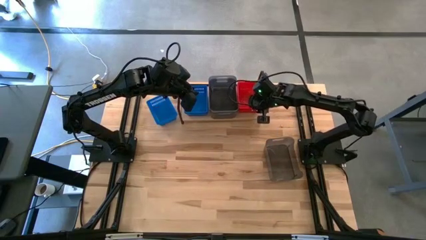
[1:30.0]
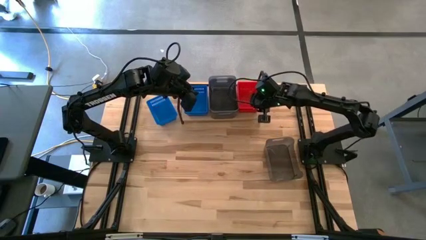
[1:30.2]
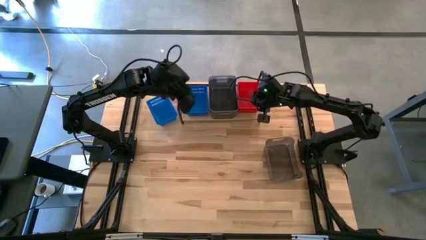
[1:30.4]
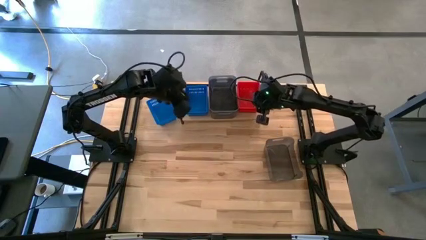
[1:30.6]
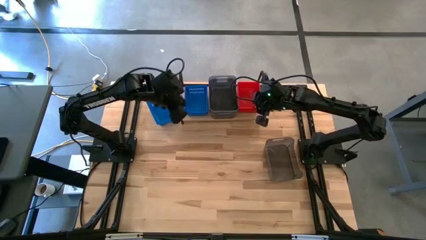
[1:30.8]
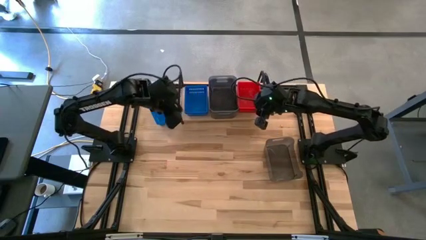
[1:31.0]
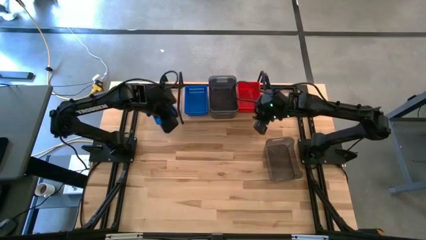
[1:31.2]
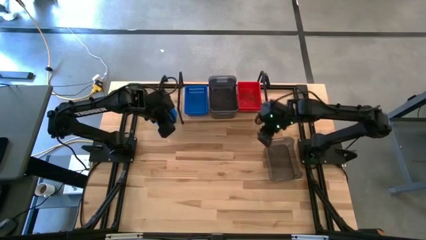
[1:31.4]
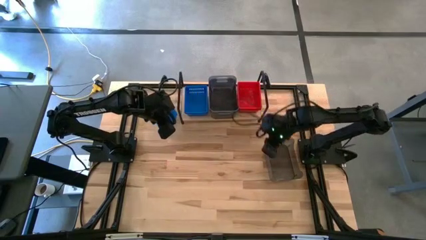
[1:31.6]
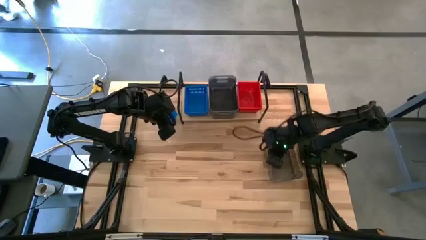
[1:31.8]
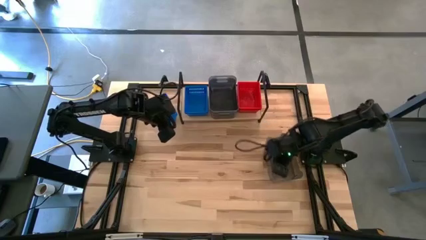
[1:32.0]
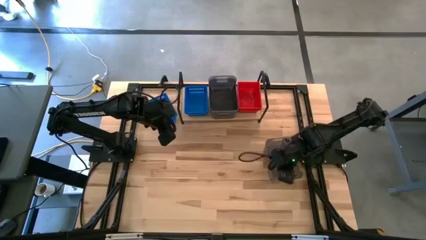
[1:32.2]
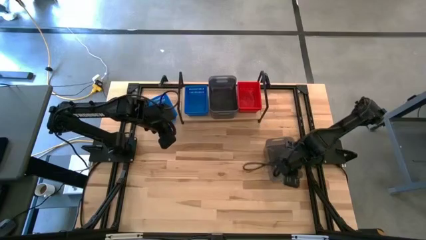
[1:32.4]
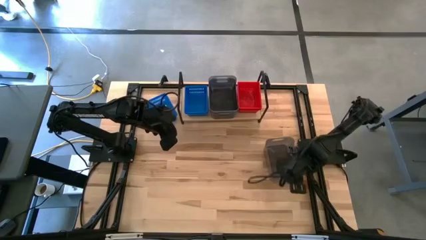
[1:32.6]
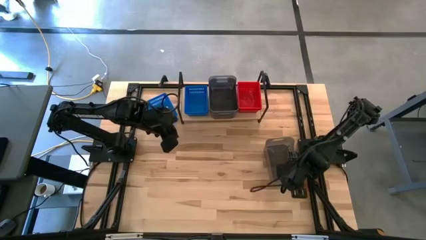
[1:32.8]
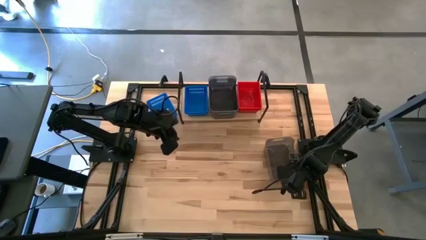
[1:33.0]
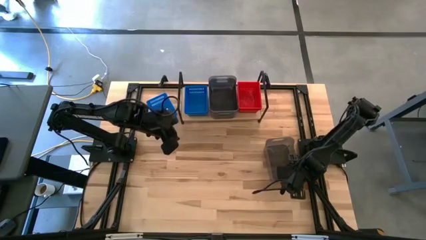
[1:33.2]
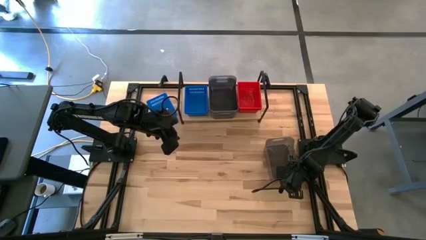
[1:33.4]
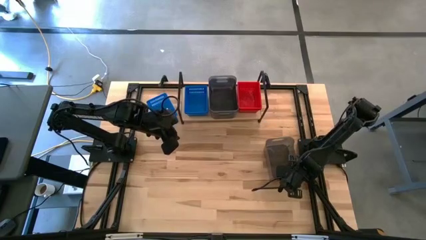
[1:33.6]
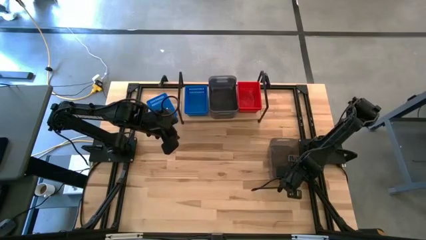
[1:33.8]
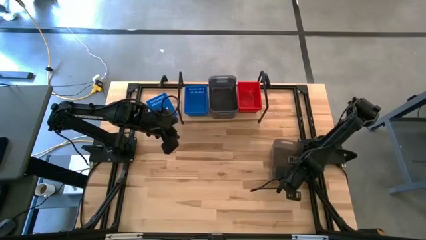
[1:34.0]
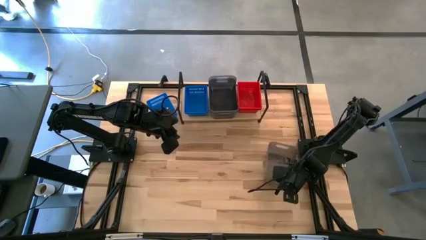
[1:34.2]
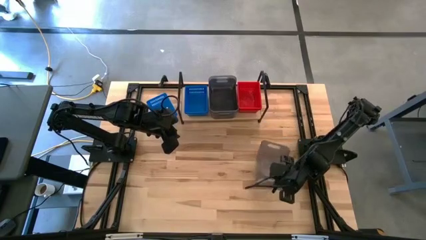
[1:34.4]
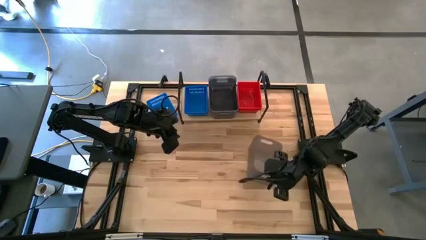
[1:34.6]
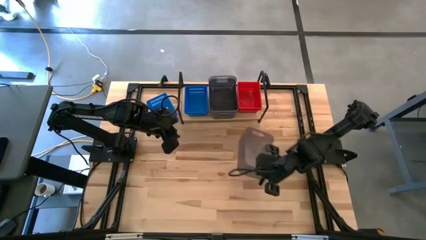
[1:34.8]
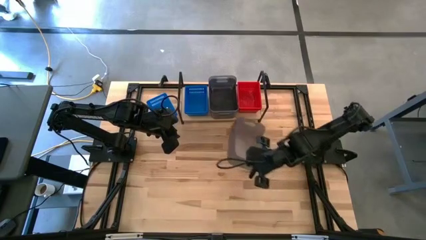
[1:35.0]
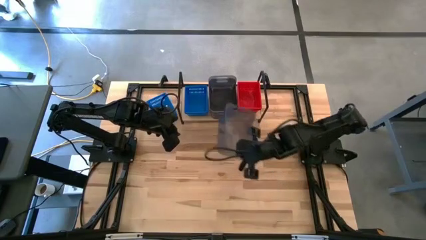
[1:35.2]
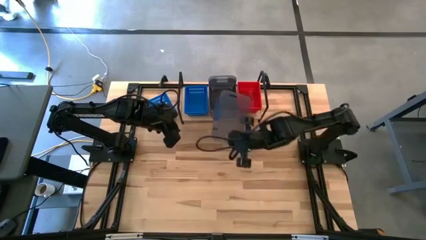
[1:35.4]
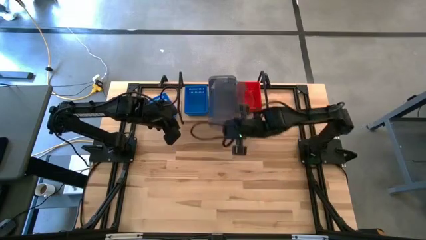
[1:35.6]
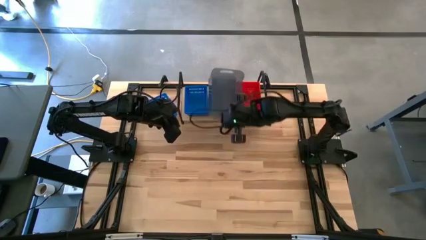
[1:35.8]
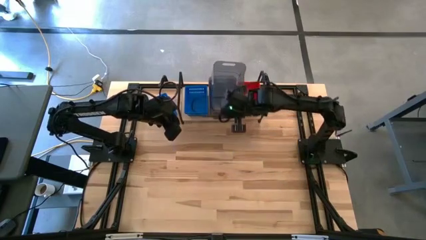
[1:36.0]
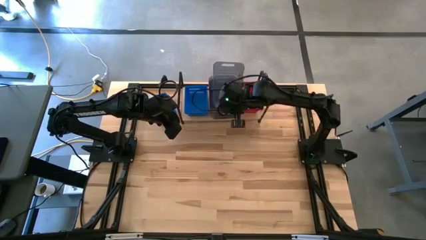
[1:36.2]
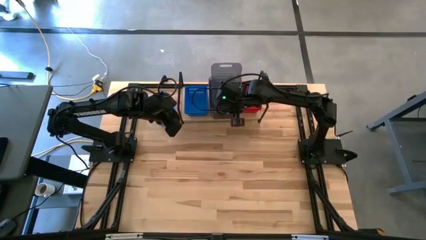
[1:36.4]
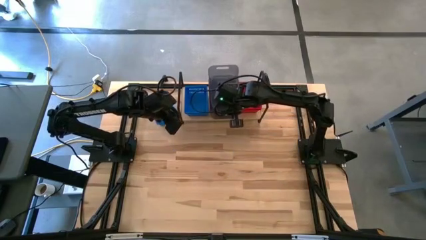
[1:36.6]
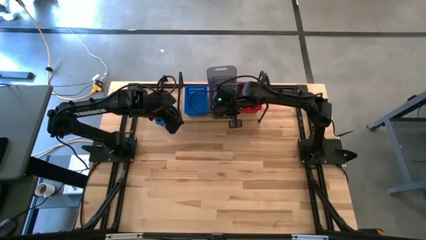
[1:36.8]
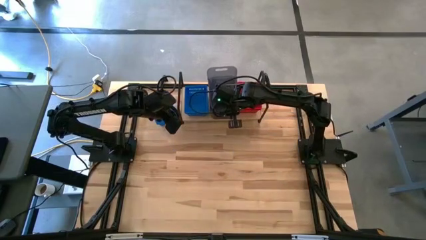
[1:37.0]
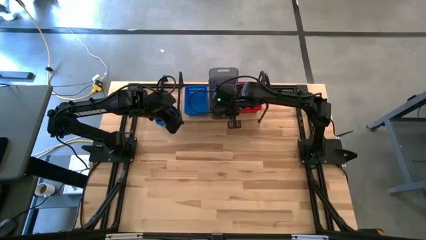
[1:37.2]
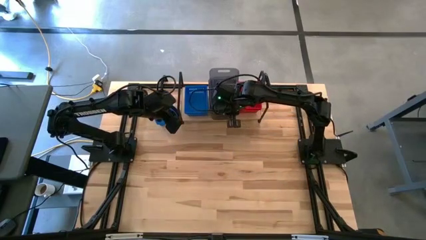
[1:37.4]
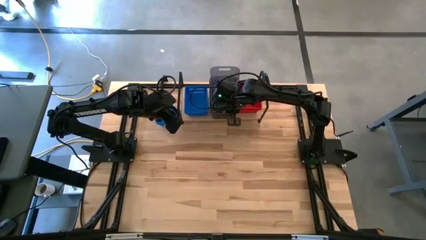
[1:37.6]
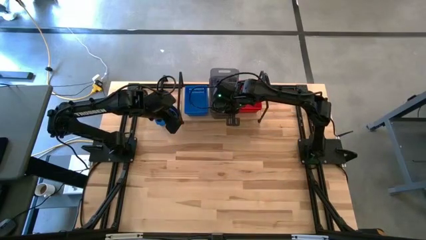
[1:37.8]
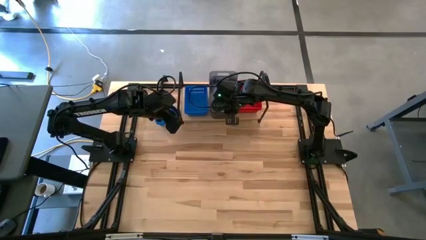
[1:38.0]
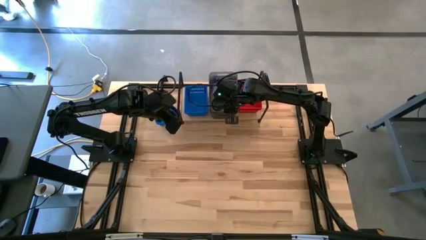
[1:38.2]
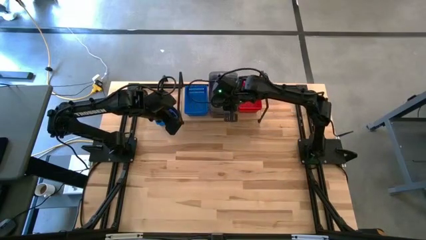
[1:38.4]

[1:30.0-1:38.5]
Task: Stack baskets on shelf by color
Stack the black bin on the black bins on the shelf

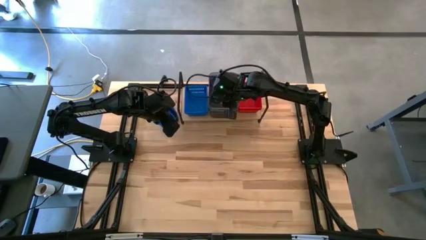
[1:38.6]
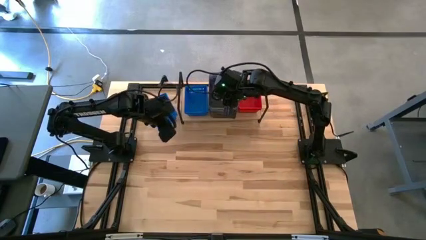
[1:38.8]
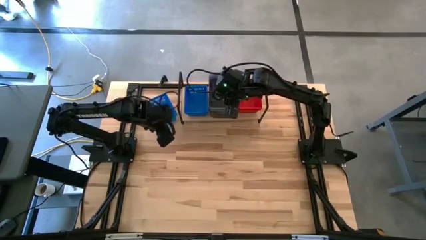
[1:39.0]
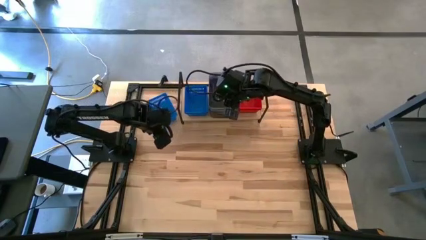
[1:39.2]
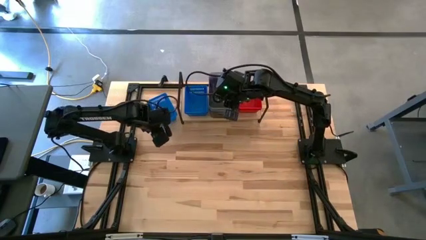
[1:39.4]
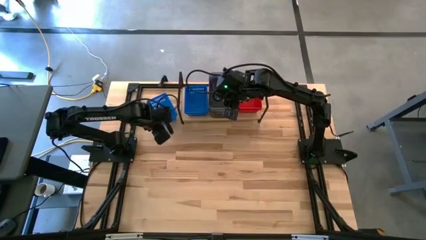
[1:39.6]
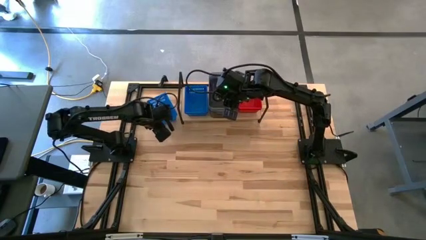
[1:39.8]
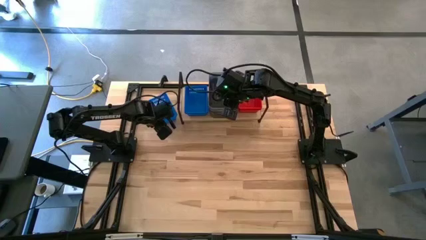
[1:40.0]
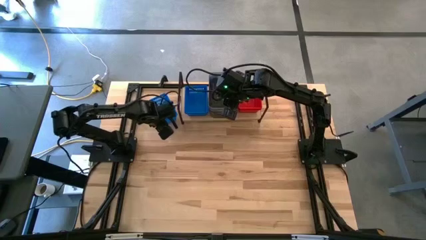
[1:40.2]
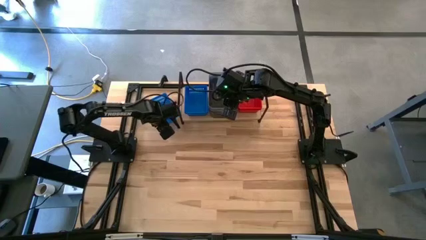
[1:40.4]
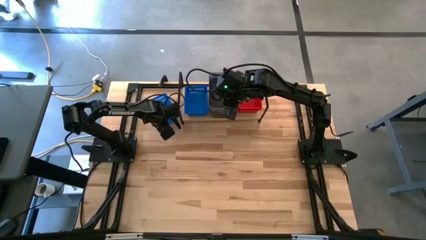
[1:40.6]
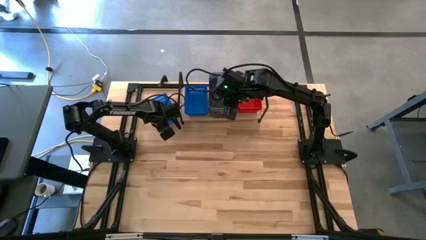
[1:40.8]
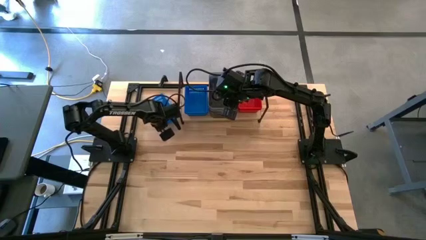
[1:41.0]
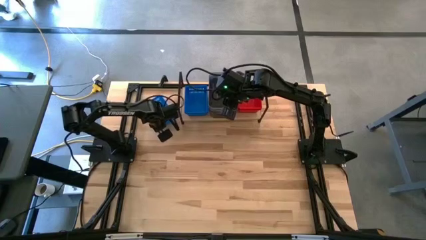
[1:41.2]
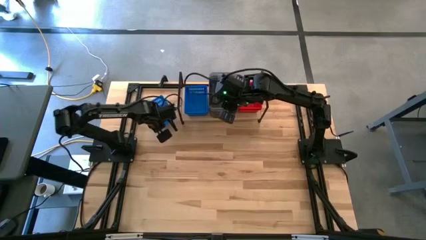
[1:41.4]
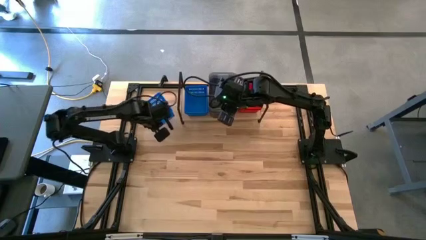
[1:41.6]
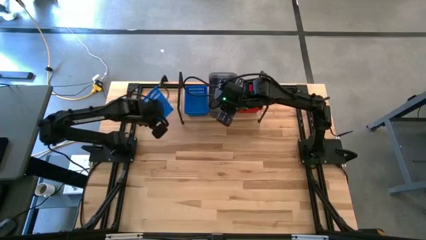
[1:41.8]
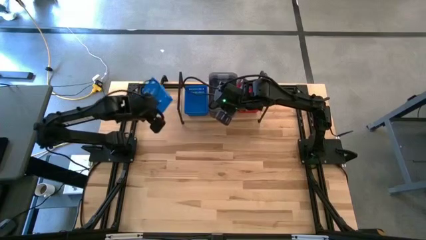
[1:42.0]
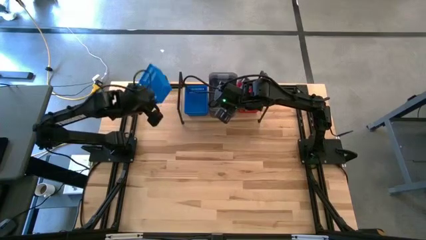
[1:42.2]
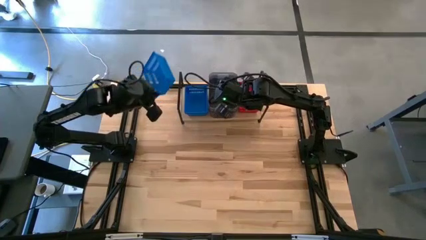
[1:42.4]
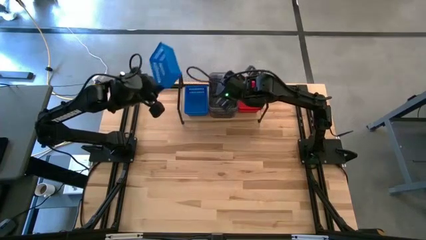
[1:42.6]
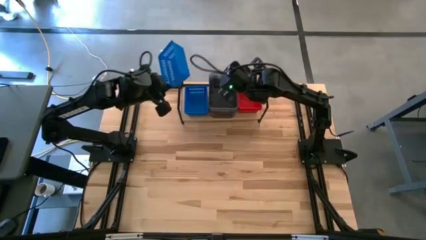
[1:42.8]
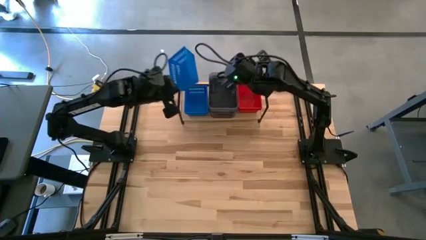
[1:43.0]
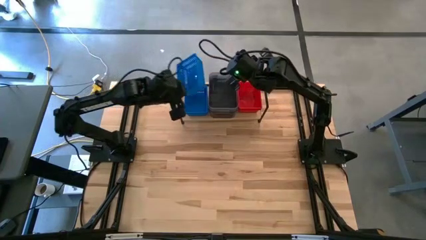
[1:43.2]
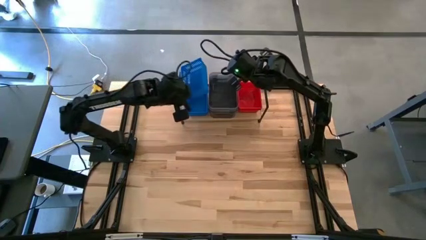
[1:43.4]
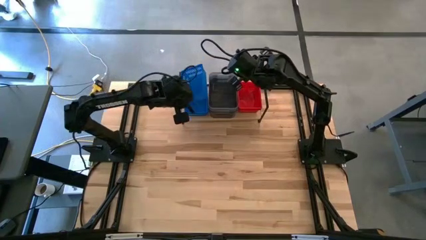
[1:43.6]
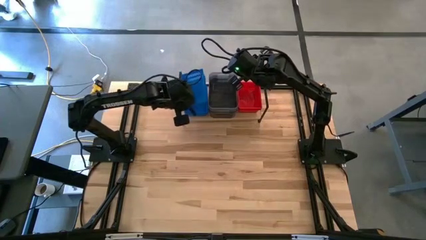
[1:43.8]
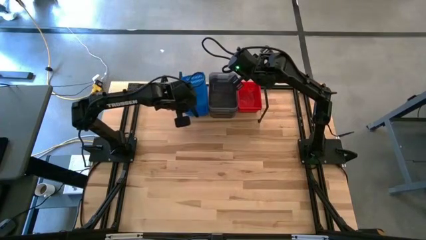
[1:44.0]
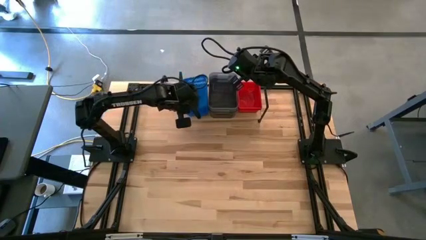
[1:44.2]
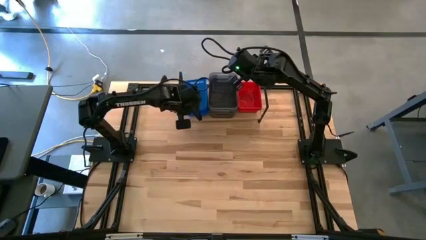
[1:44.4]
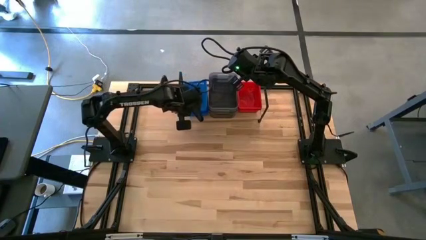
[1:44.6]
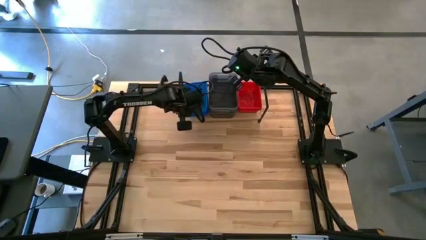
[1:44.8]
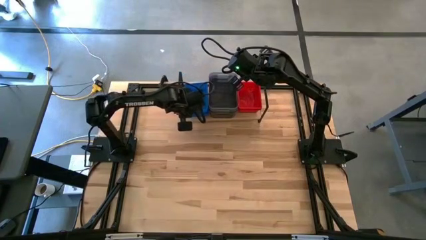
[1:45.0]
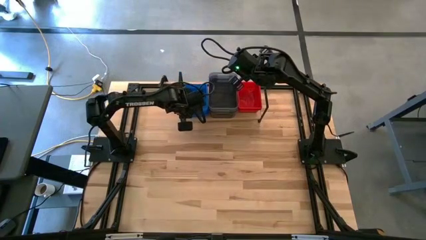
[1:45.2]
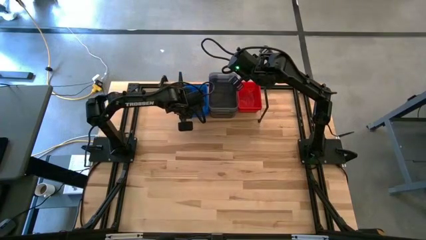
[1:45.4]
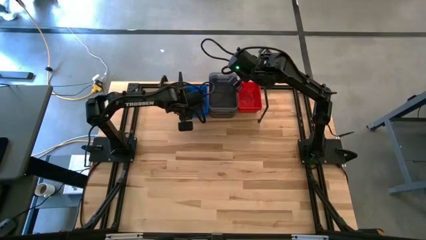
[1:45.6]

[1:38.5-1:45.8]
Stack the blue bin on the blue bins on the shelf
